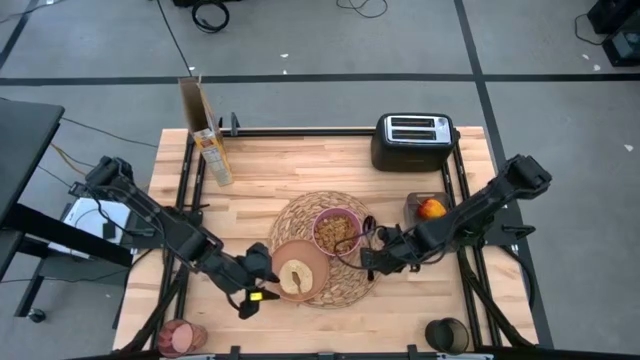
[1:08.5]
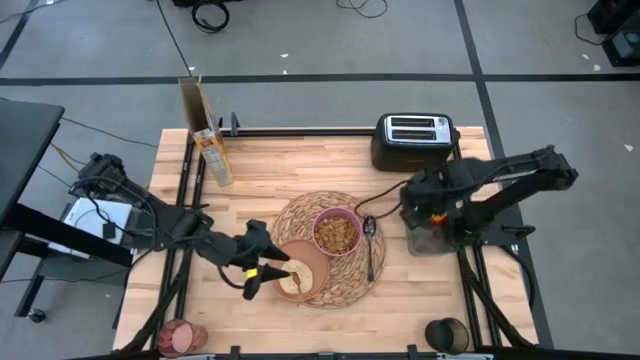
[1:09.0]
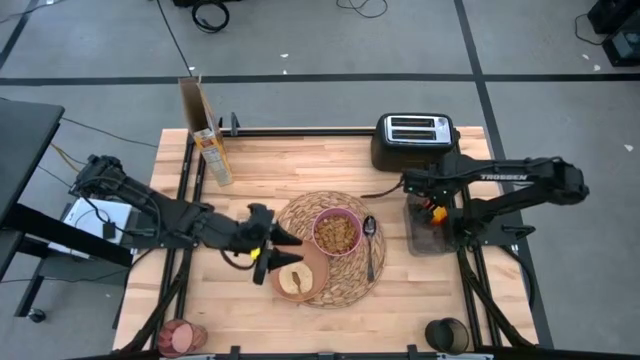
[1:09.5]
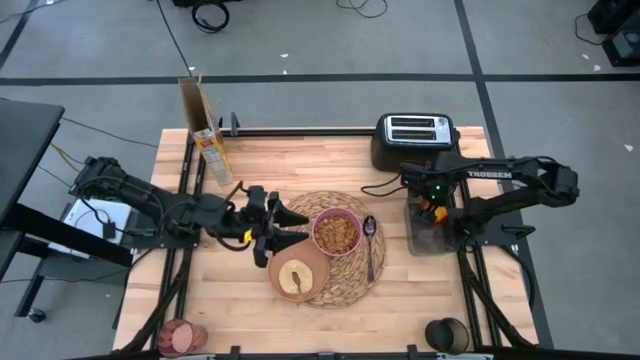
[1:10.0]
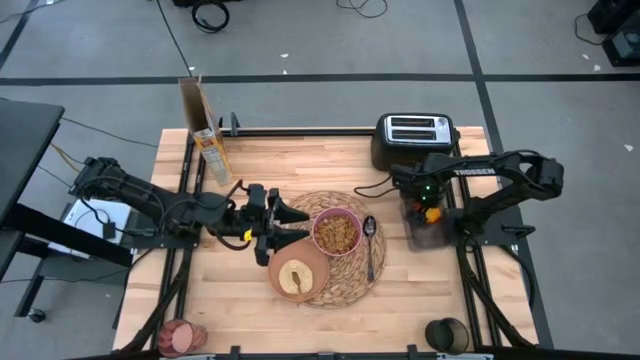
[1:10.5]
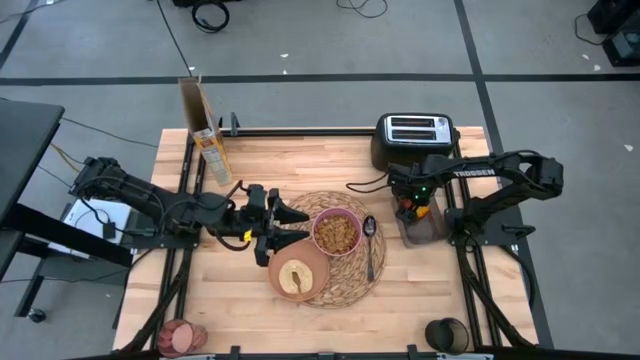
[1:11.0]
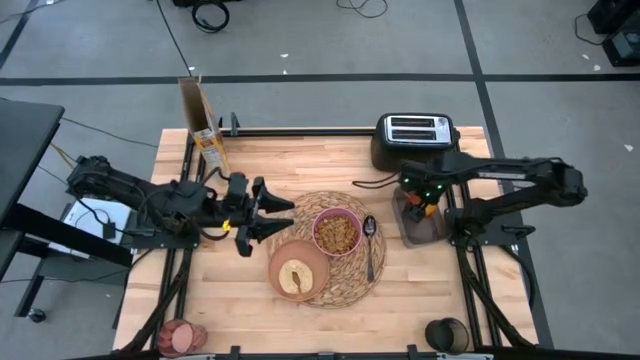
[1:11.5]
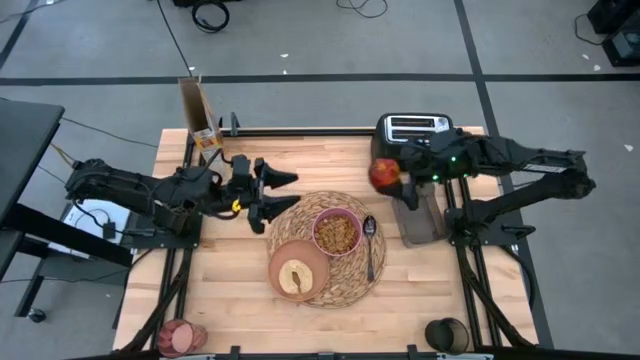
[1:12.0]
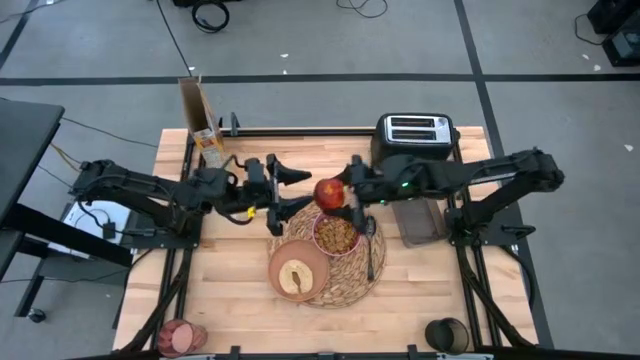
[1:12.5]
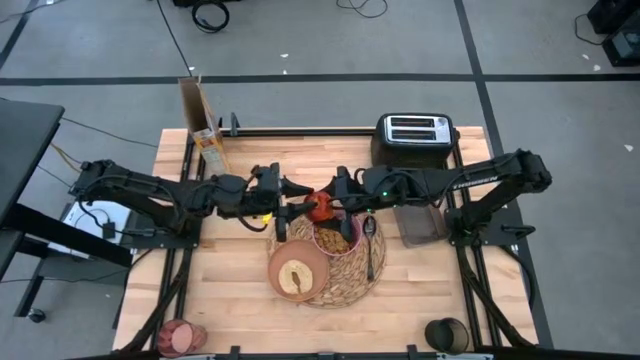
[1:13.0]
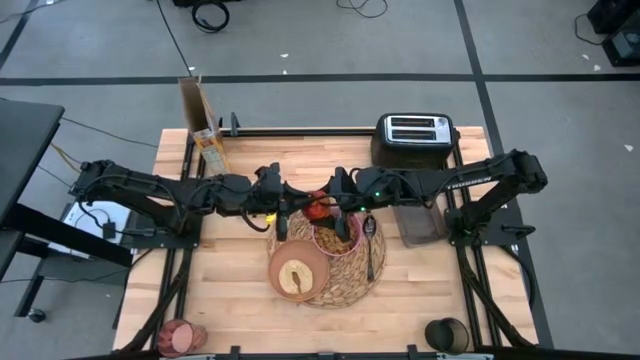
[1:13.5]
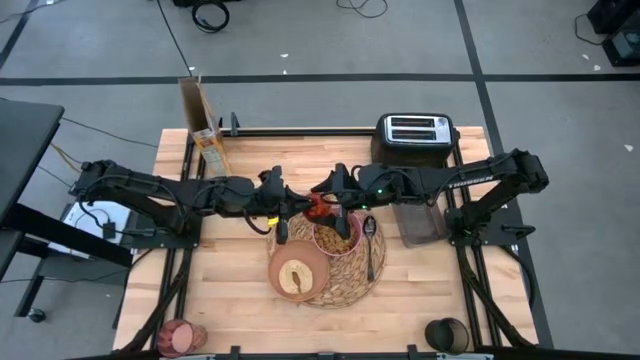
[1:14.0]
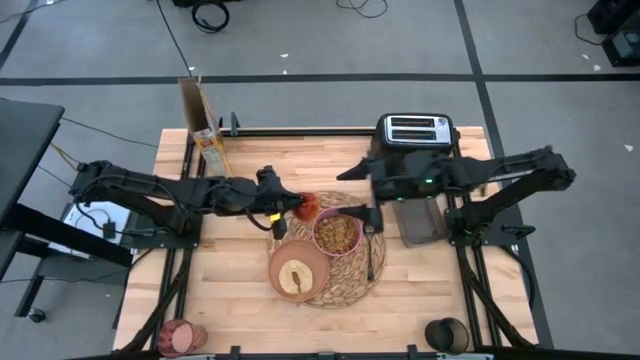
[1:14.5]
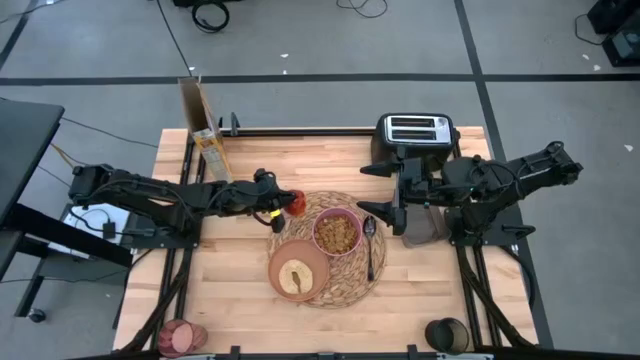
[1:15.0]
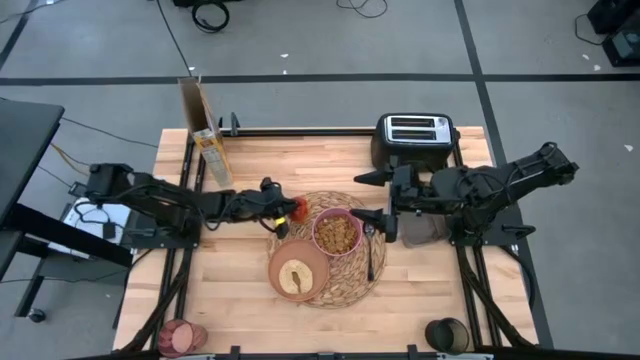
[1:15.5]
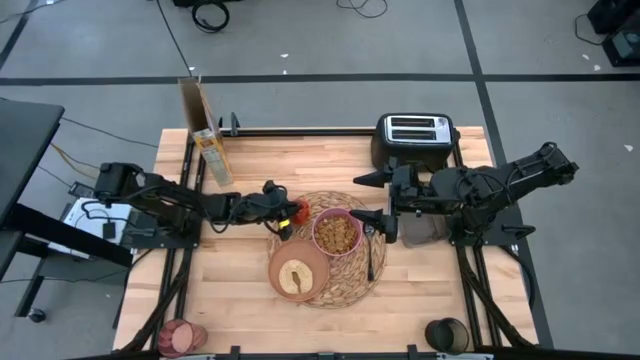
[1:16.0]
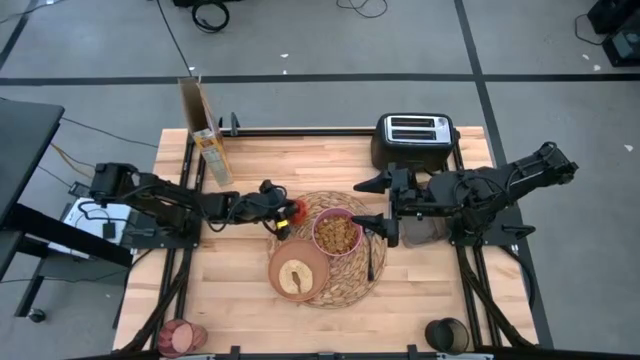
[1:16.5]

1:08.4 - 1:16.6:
Task: Arrange a breakfast setting
Put the apple on the brown placemat

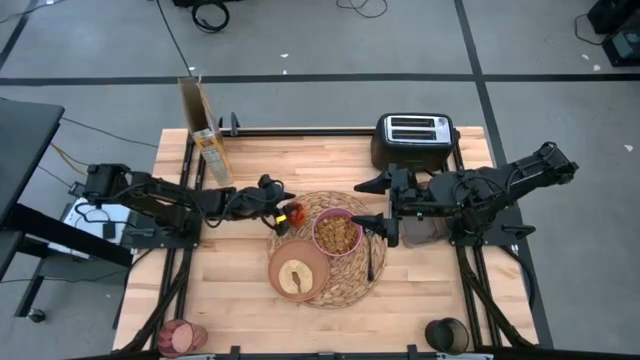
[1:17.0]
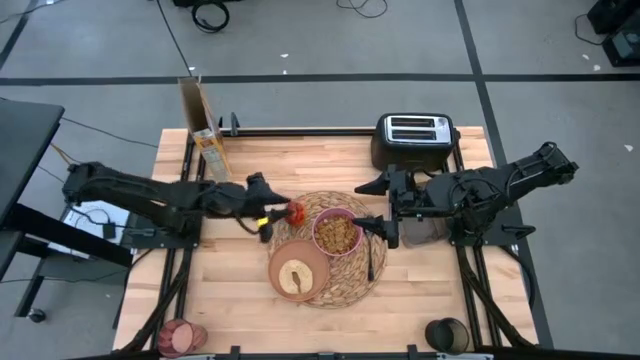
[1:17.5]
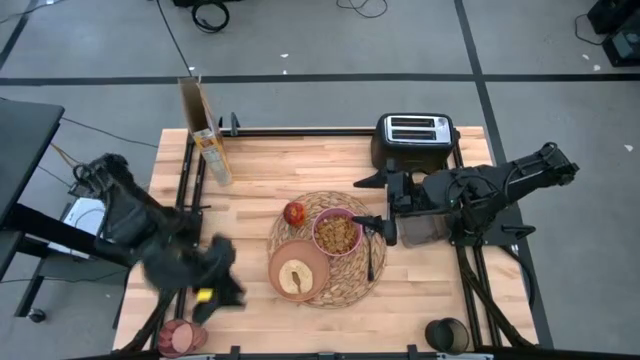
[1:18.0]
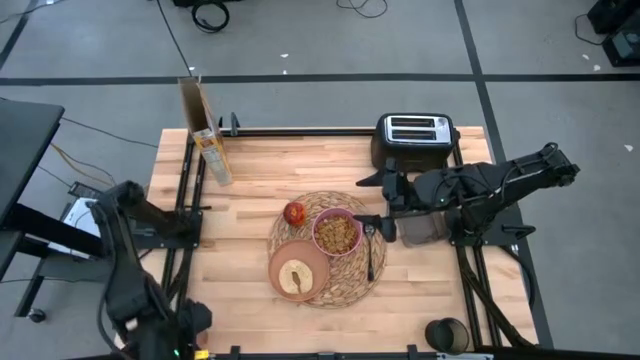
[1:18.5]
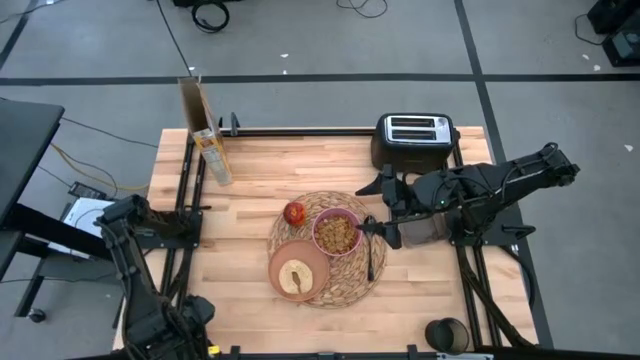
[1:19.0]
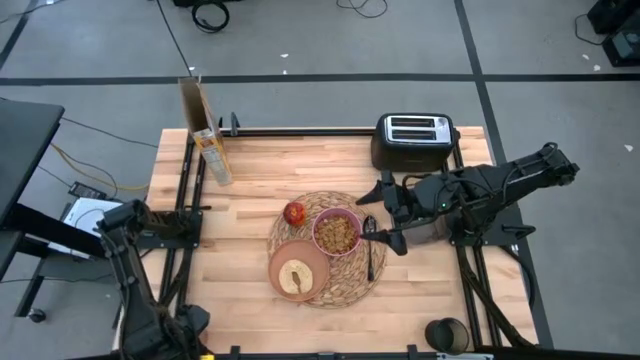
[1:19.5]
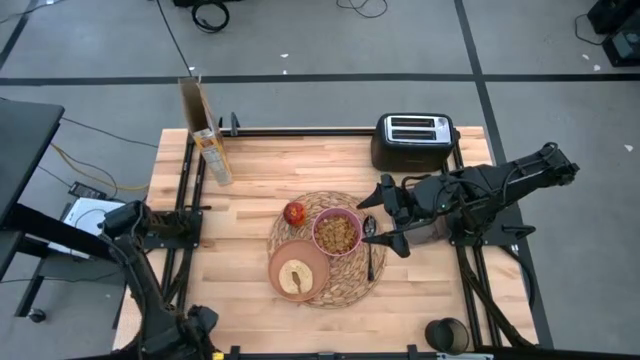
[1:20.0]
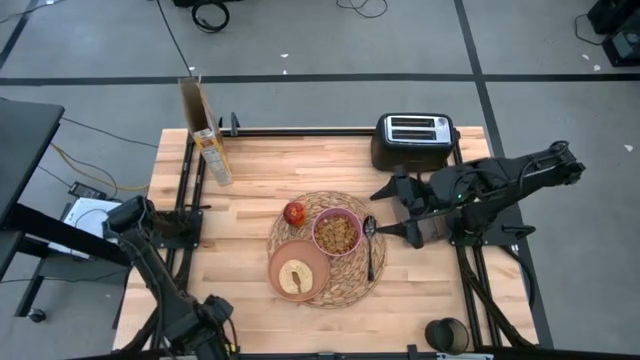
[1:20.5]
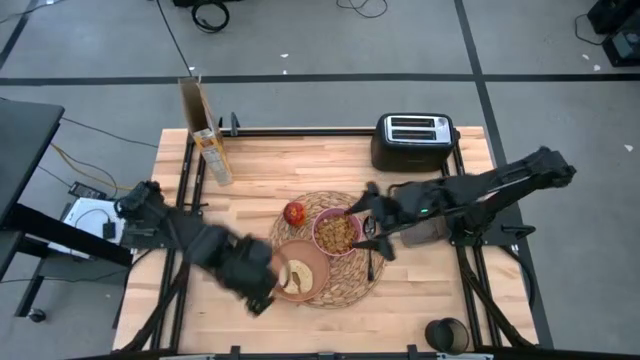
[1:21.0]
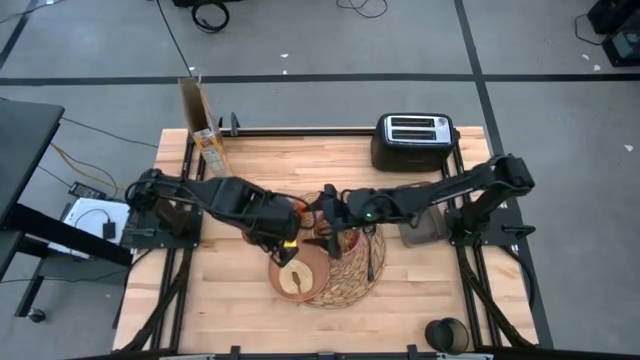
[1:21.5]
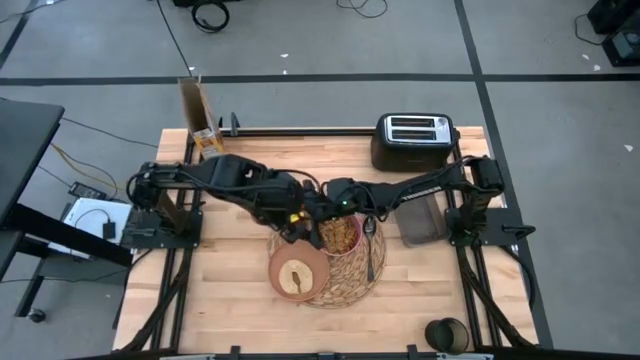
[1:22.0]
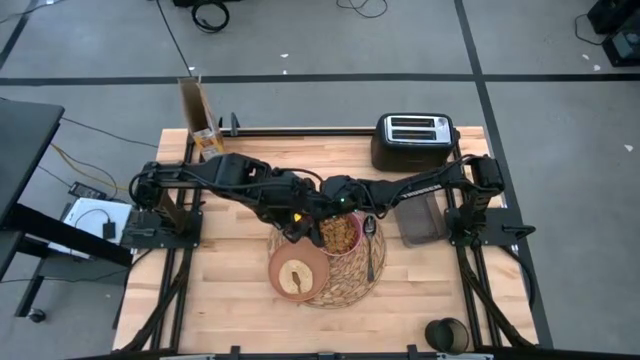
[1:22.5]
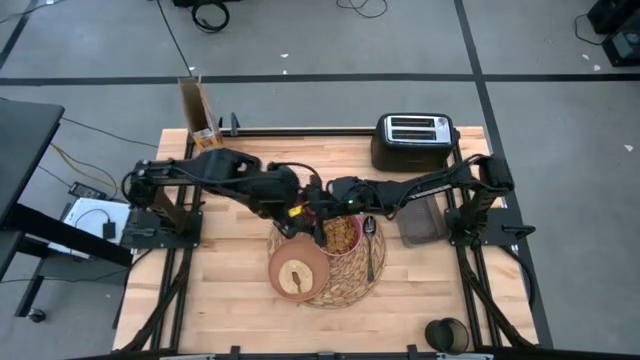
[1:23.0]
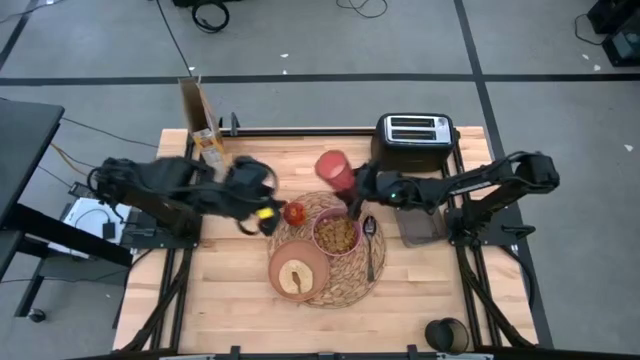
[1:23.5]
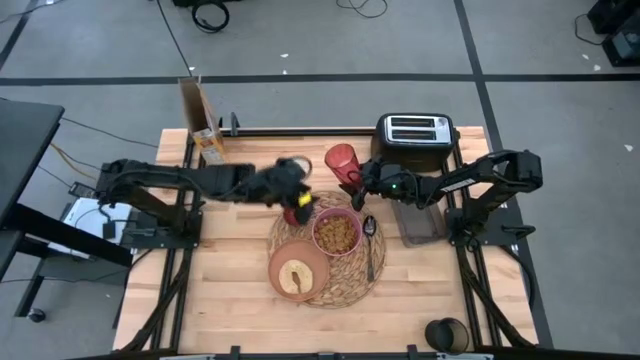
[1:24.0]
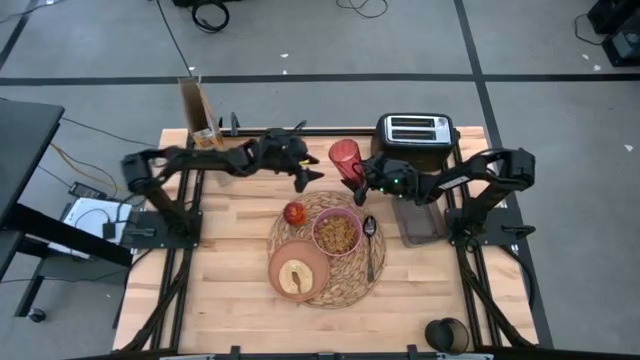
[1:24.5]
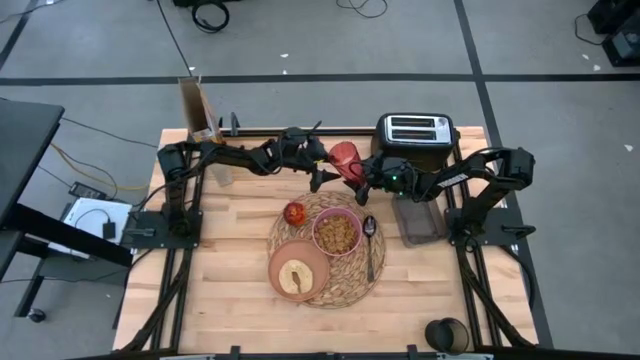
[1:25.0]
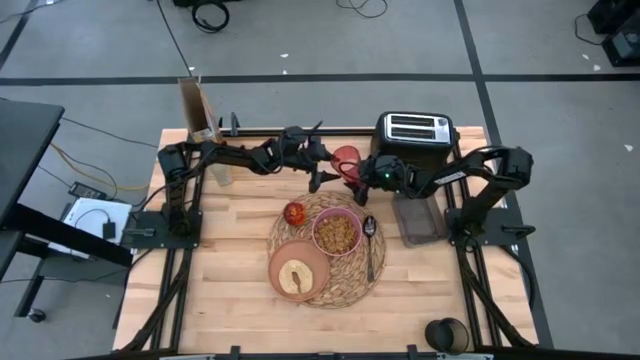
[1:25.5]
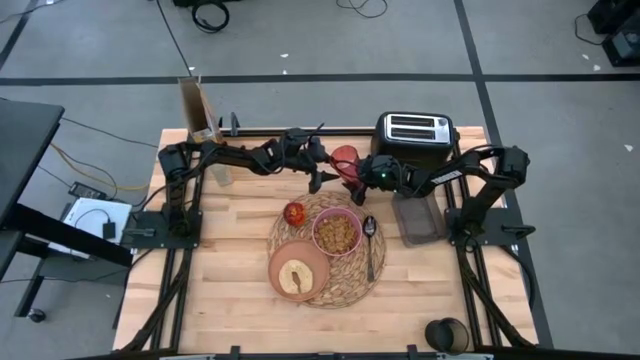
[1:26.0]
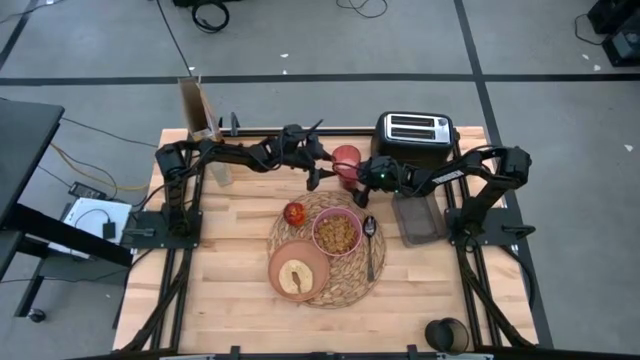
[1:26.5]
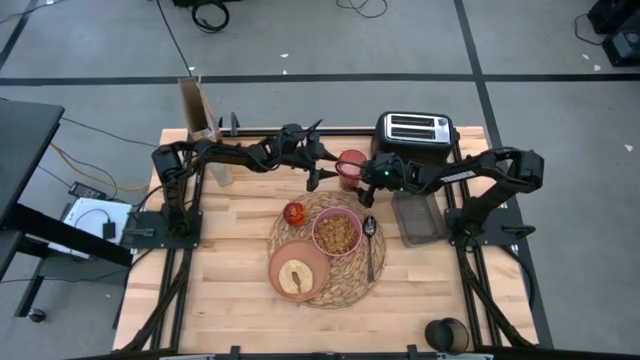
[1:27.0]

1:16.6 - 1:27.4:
Put the red cup to the top right of the brown placemat

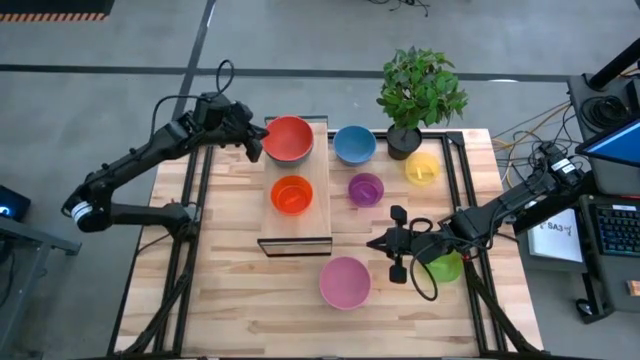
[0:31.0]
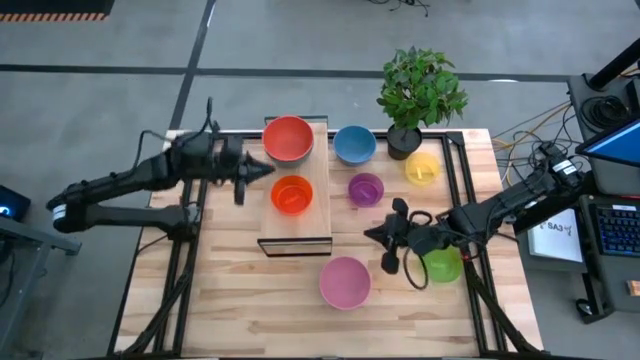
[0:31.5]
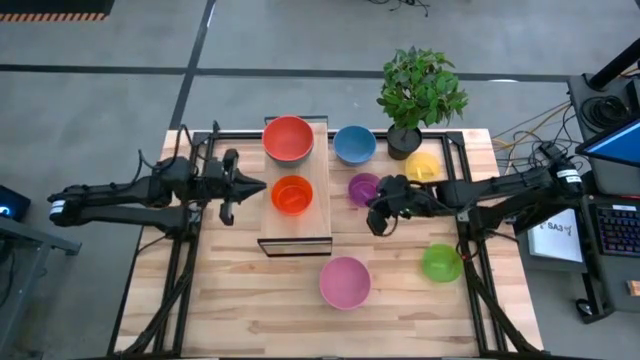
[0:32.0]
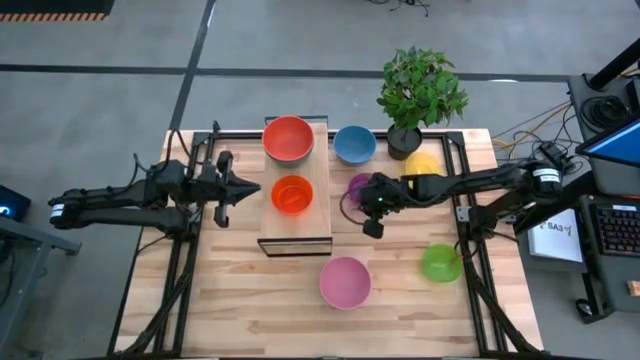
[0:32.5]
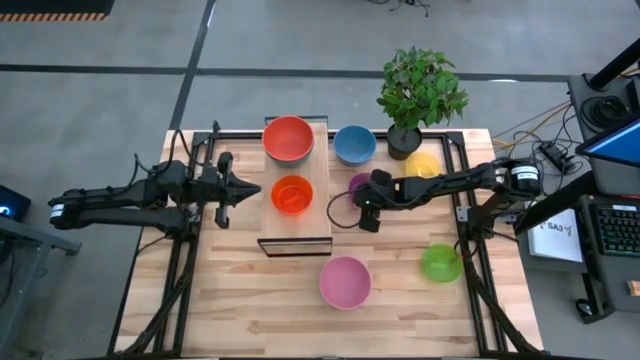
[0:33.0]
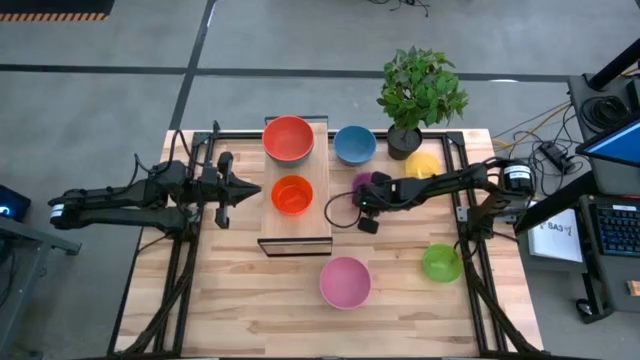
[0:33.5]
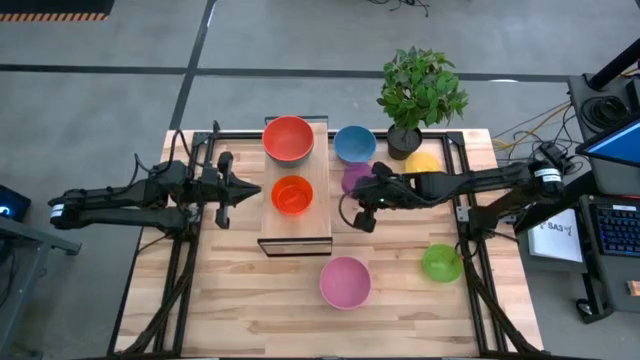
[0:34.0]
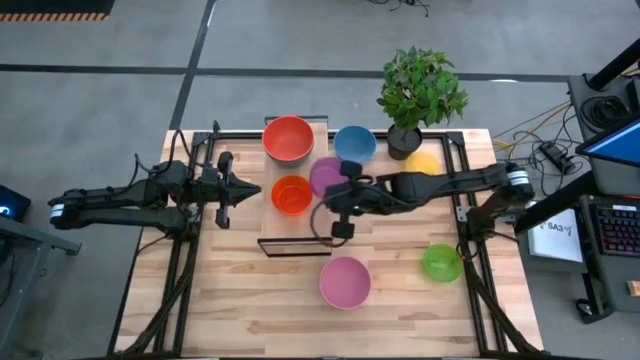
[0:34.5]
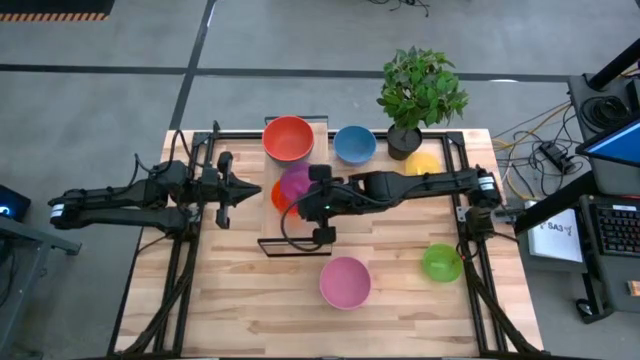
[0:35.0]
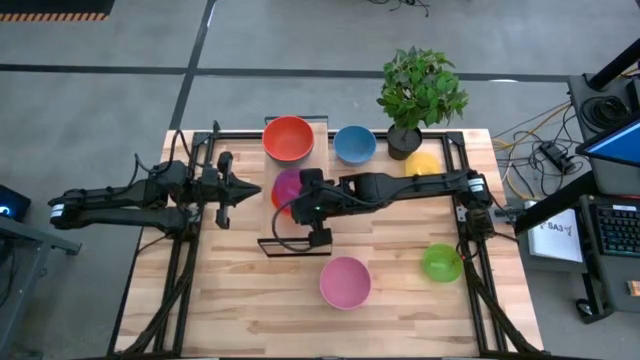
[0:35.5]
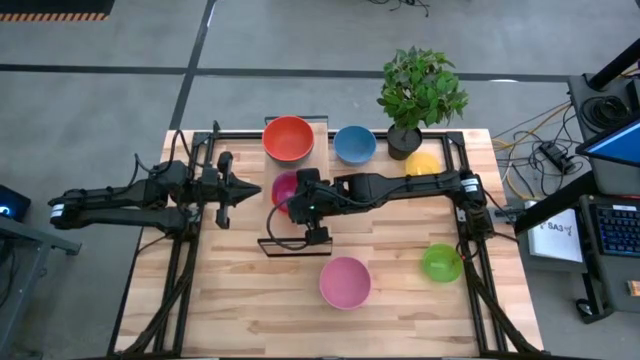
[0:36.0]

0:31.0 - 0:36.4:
Task: Place and stack bowls onto a shelf
Stack the purple bowl on top of the light orange bowl on the shelf
